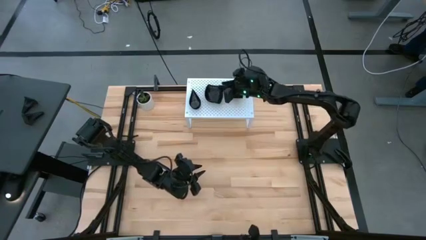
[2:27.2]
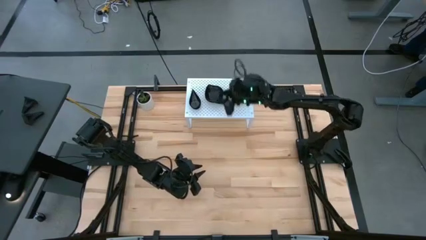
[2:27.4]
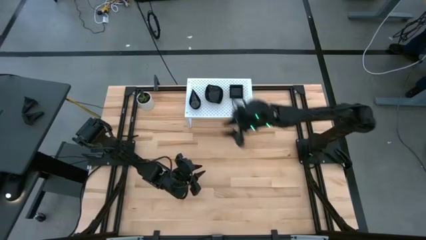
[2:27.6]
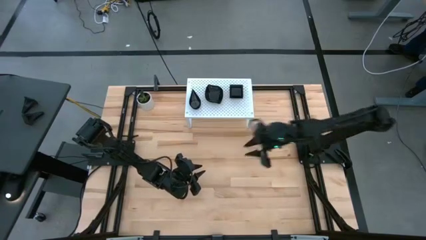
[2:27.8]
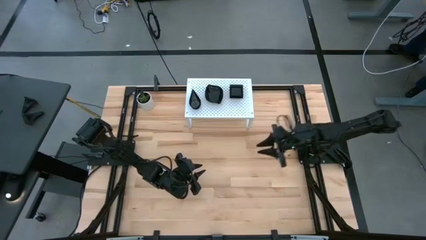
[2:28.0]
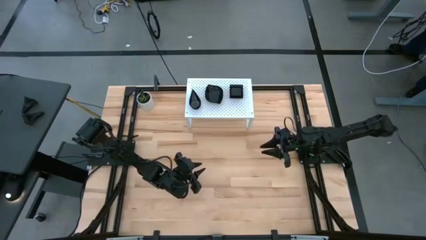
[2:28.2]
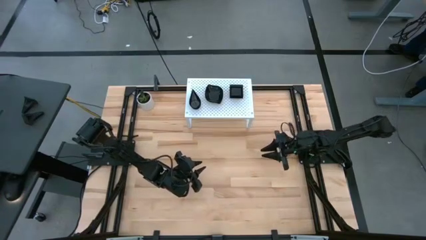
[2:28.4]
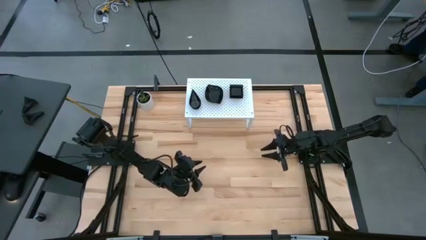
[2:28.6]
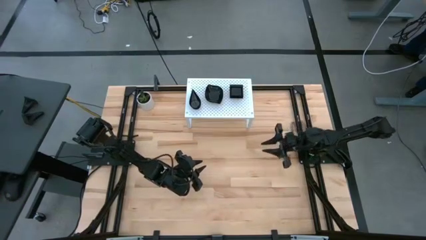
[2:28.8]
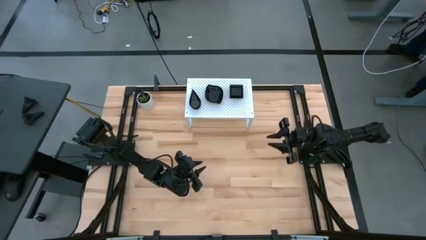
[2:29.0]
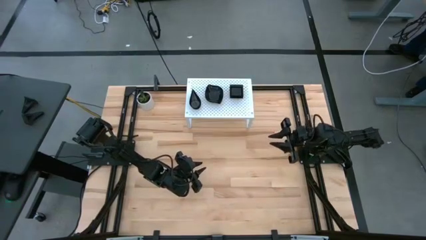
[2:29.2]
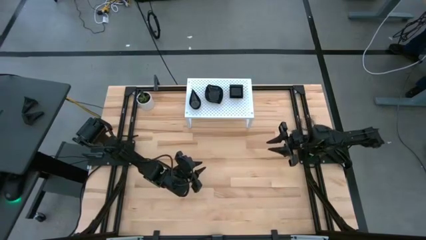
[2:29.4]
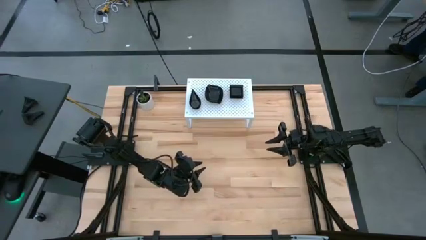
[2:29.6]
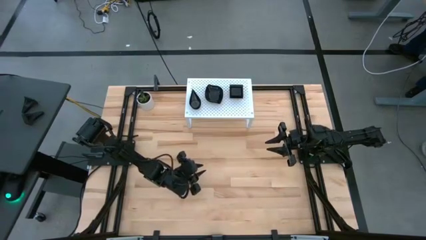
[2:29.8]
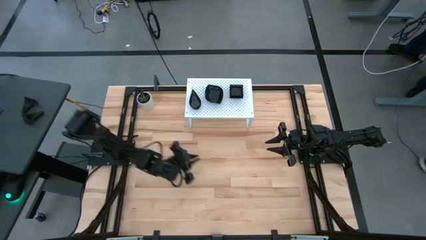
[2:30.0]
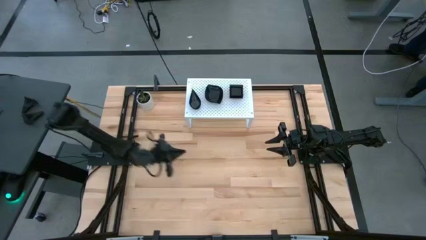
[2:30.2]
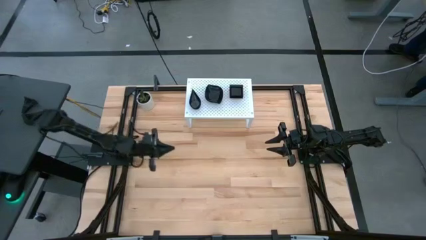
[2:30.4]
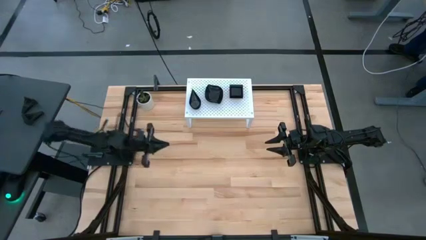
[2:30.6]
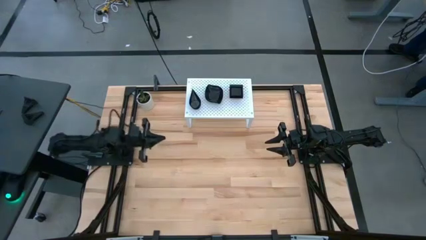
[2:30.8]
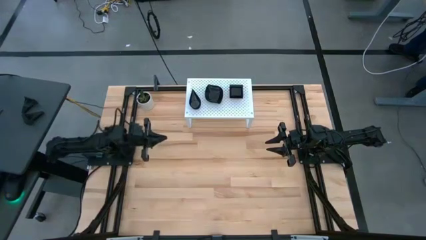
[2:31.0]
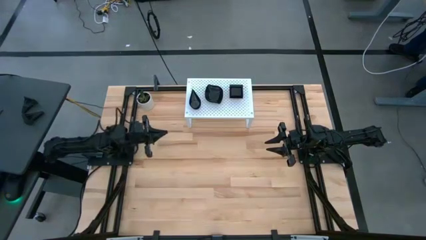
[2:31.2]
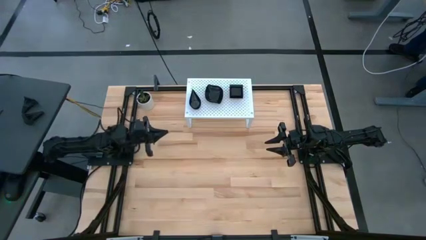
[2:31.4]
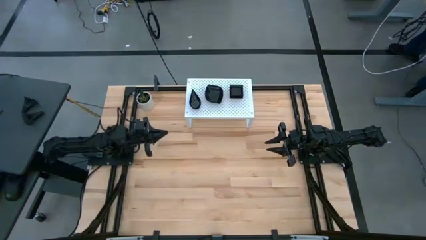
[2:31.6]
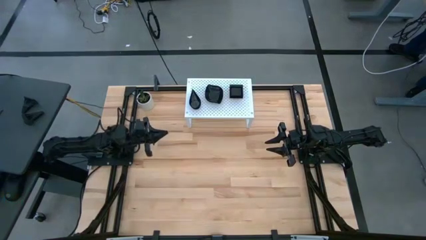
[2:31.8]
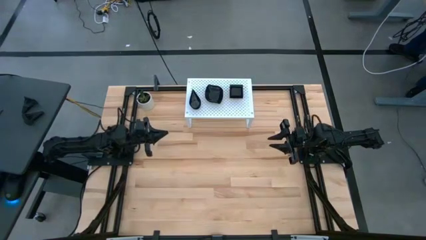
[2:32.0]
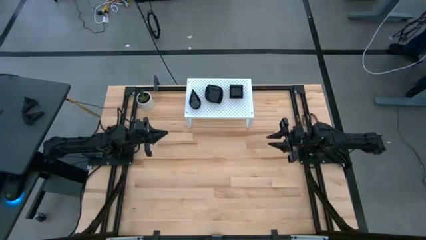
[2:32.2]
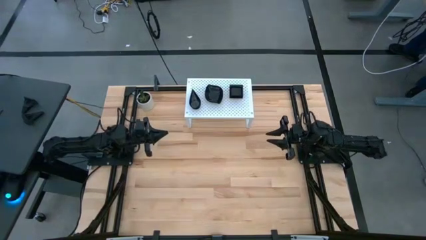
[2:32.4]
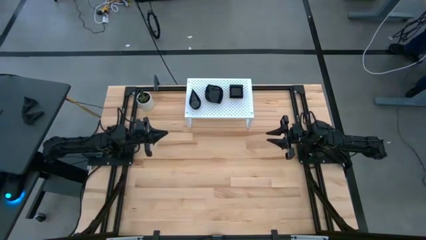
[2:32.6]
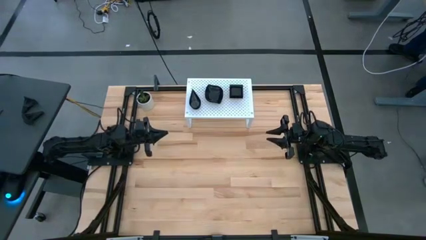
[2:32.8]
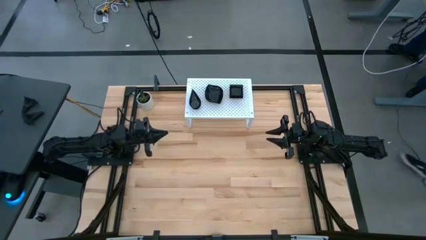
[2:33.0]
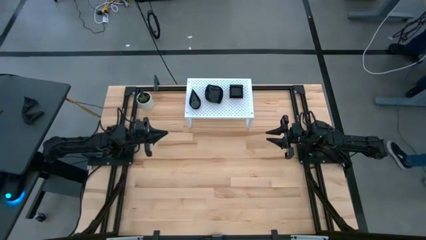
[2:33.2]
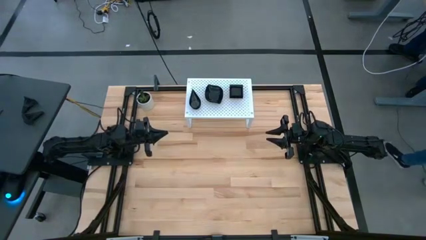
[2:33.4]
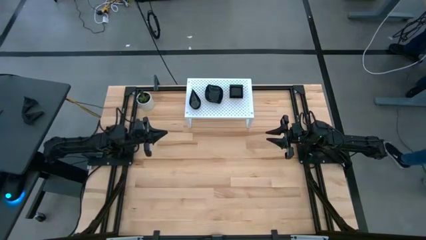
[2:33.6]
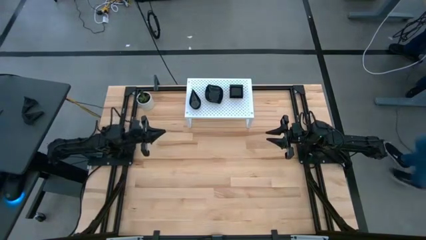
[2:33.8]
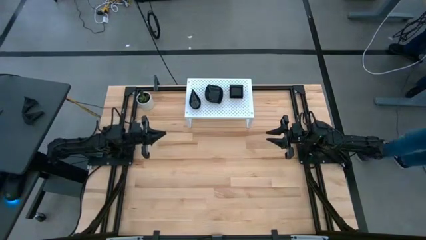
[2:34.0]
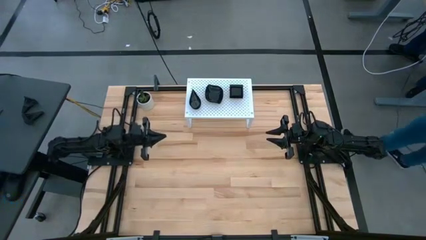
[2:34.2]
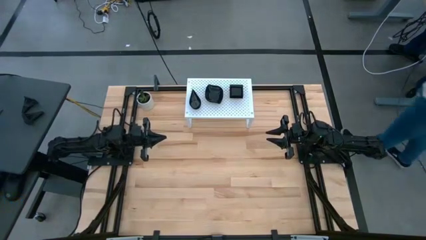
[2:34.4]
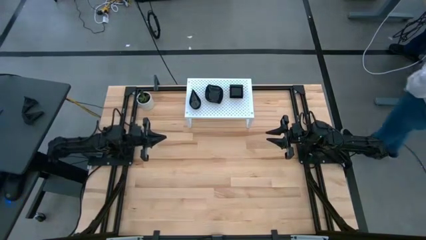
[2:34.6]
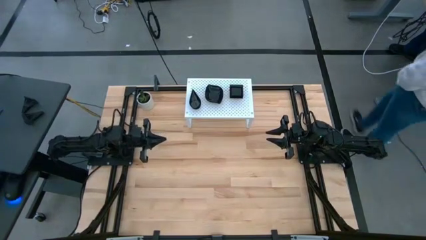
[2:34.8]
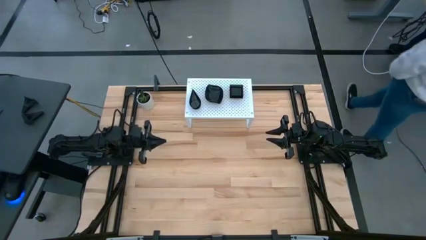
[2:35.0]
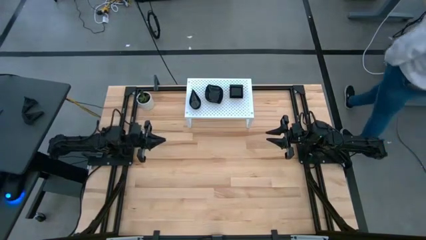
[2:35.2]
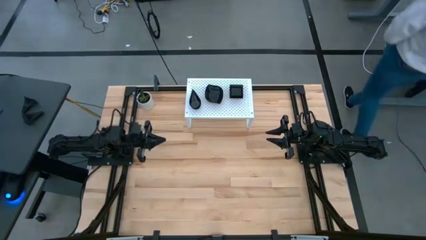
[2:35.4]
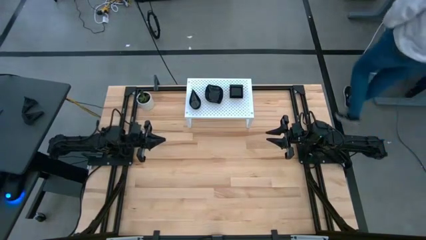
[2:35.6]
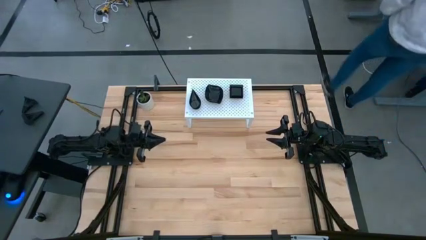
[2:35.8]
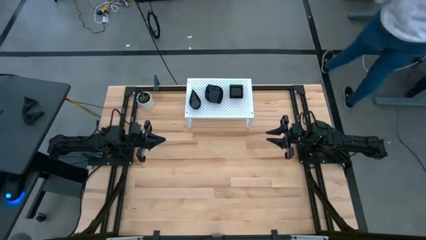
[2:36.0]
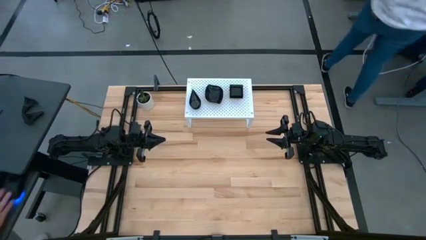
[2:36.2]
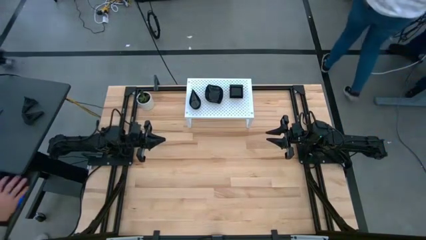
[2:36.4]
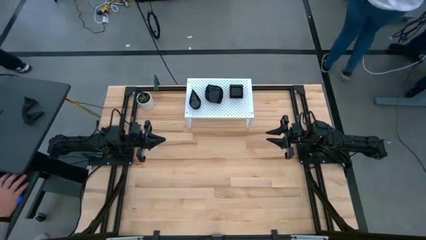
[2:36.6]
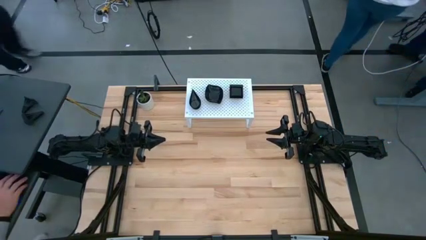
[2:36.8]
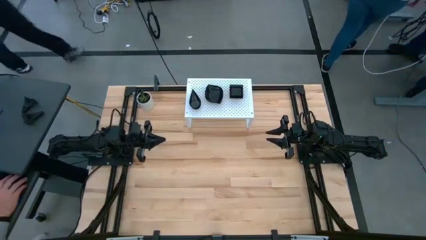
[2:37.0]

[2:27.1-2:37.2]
Task: Pick & Place Mini shaped plates
Return to Home Position

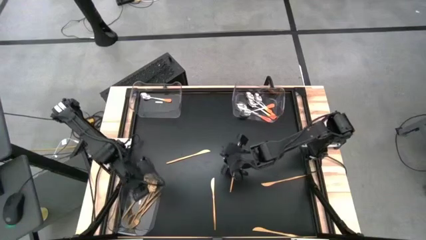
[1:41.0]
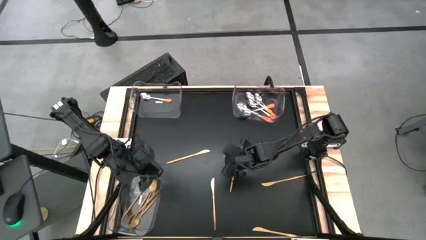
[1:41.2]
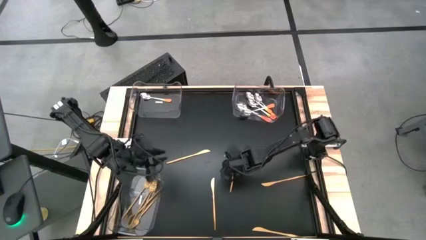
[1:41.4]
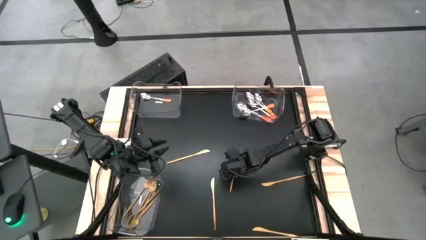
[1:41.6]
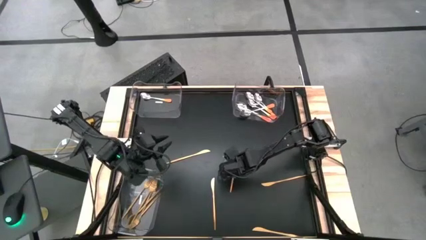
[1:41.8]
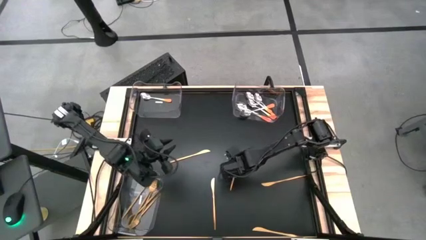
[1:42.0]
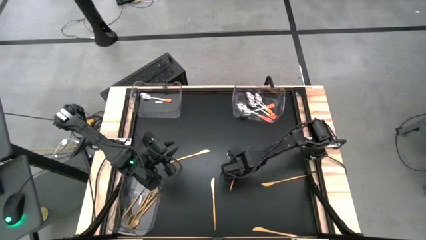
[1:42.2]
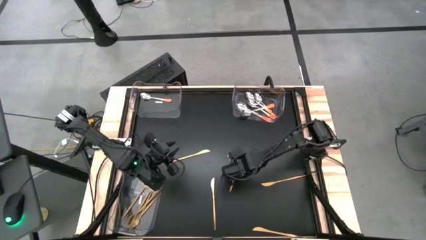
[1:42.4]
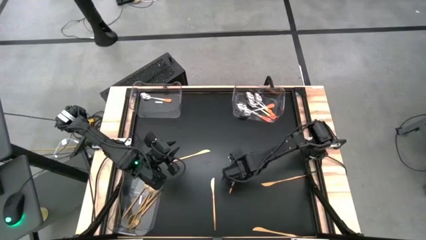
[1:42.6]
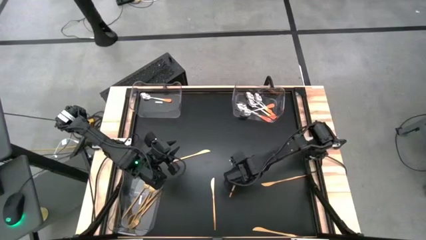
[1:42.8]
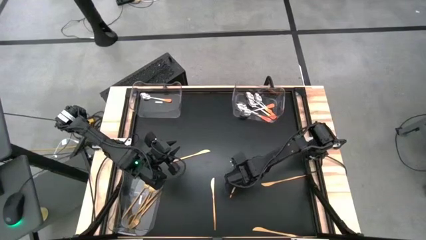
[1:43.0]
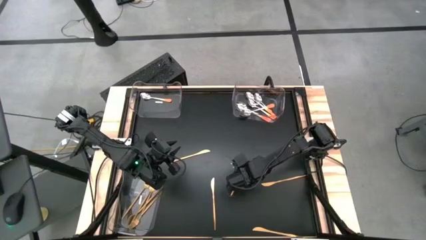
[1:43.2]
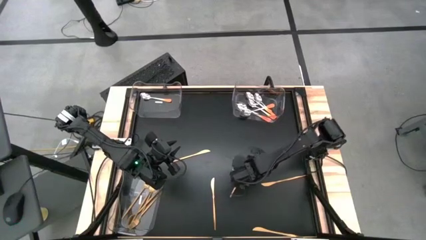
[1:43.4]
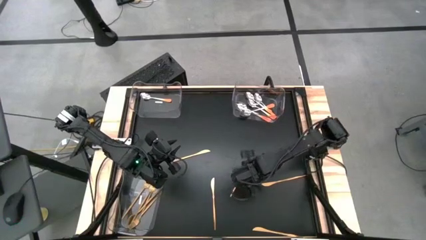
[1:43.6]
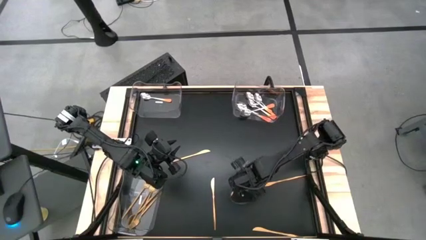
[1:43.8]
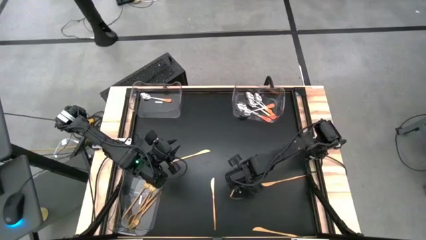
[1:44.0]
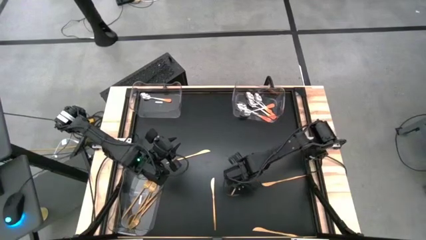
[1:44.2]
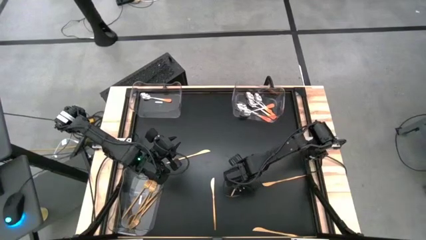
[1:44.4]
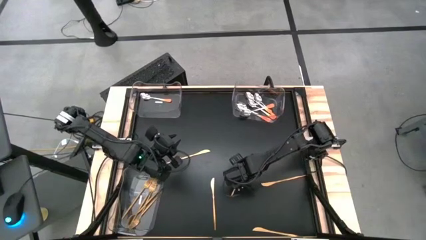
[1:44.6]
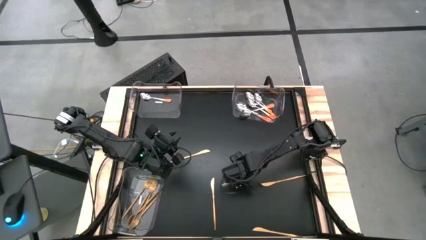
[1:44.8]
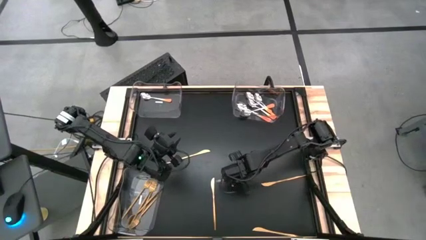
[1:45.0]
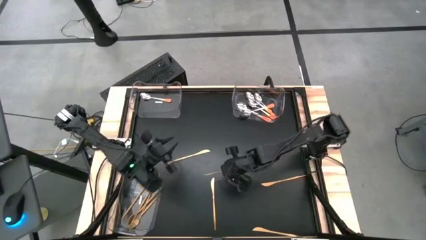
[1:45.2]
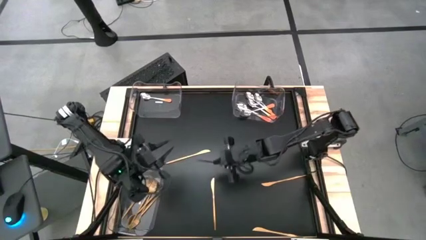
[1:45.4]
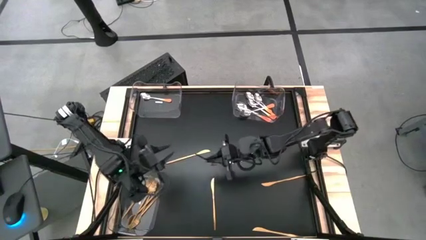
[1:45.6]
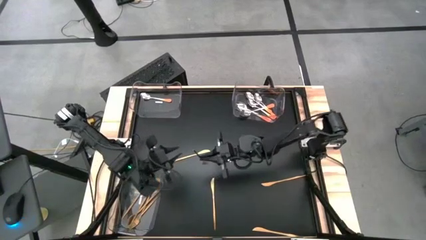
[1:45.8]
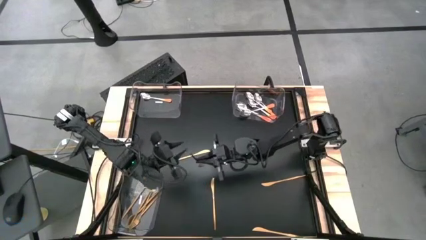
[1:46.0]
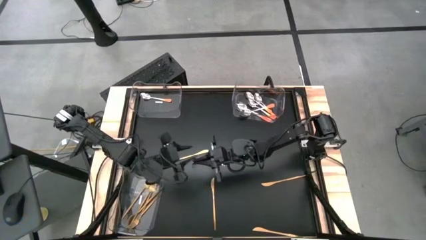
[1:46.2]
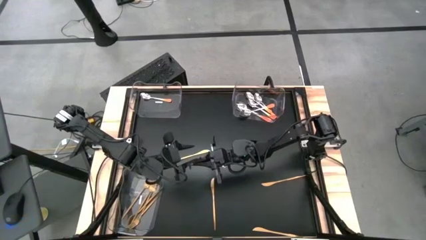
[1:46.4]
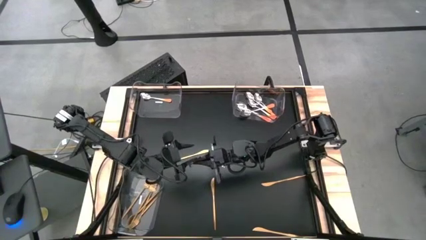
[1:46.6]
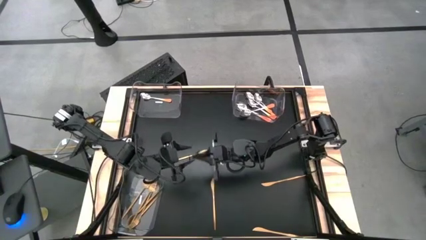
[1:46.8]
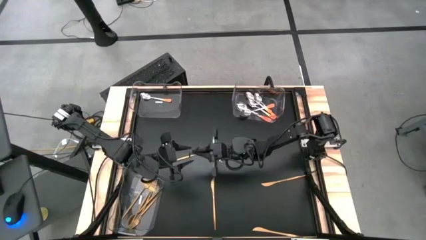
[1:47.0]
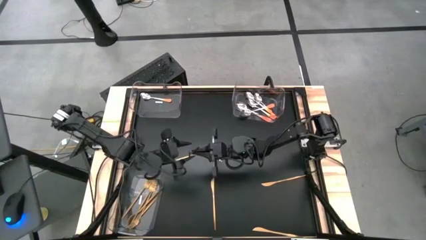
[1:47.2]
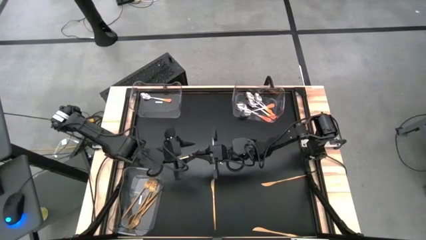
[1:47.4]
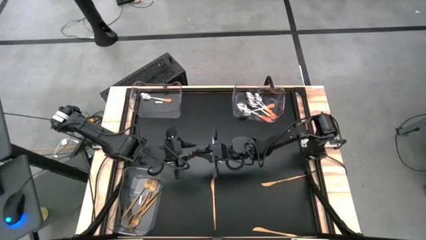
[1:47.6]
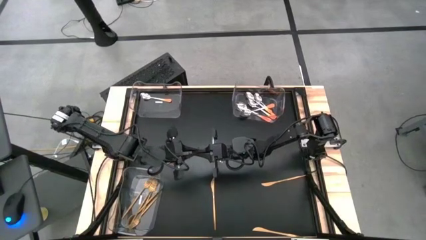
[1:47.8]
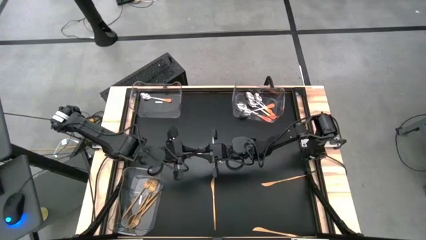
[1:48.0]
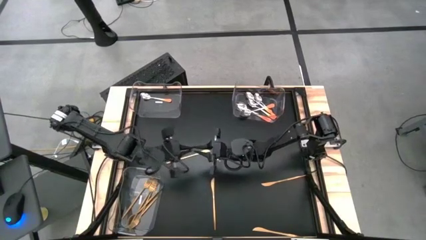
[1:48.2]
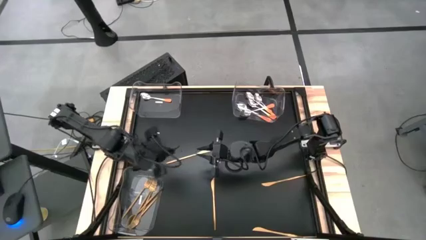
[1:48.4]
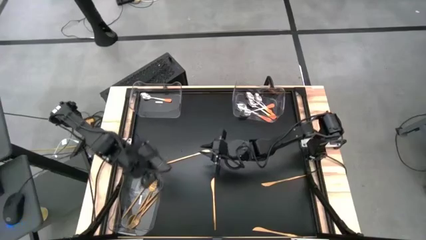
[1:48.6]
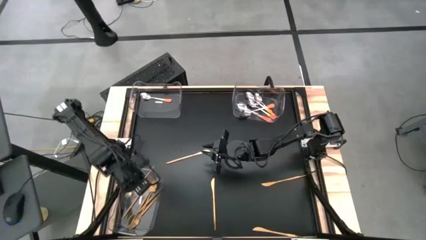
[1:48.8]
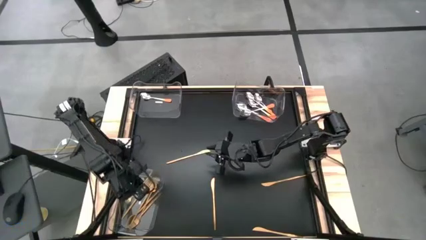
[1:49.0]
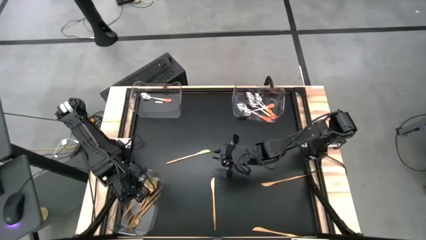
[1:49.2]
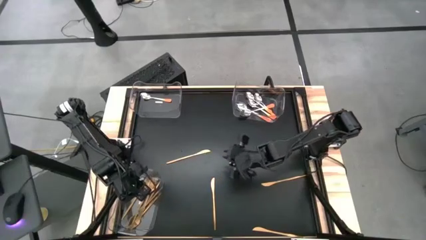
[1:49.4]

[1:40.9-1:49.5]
Task: Sort silverware by color (type)
Put the gold fork into the bottom left transparent bin
